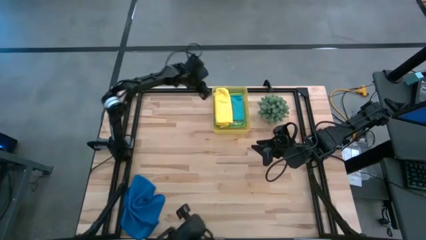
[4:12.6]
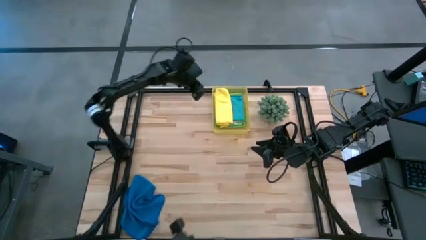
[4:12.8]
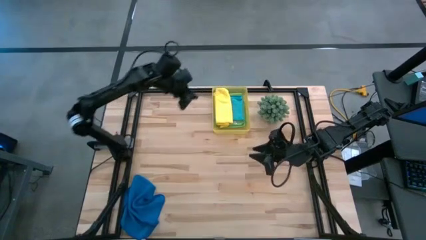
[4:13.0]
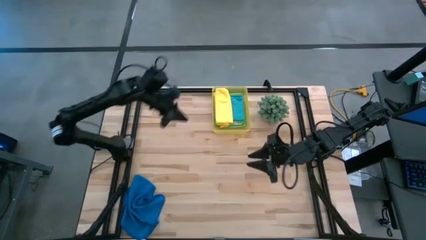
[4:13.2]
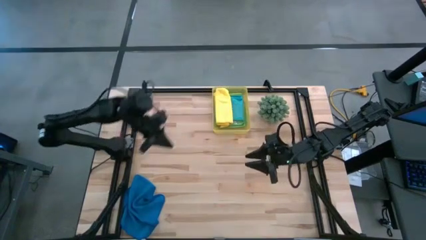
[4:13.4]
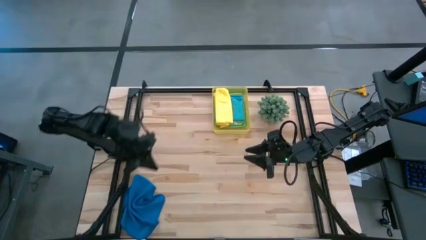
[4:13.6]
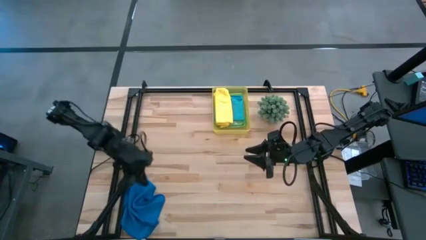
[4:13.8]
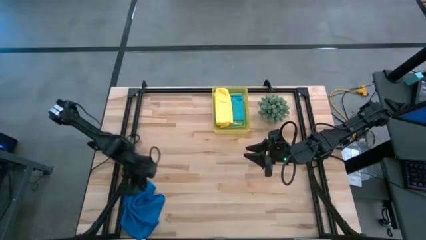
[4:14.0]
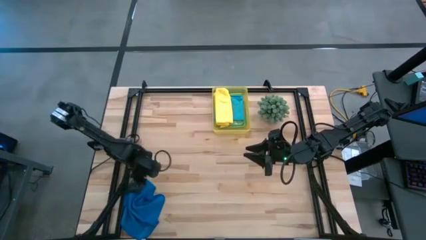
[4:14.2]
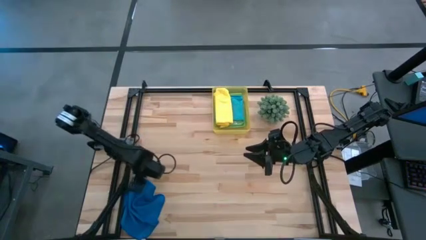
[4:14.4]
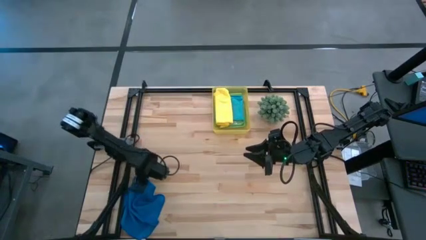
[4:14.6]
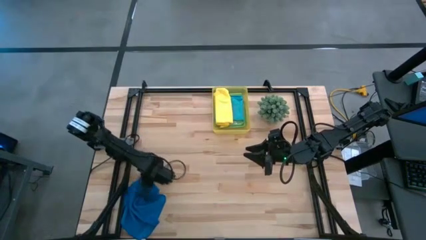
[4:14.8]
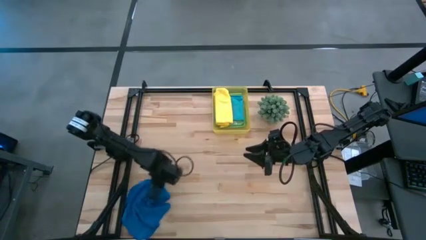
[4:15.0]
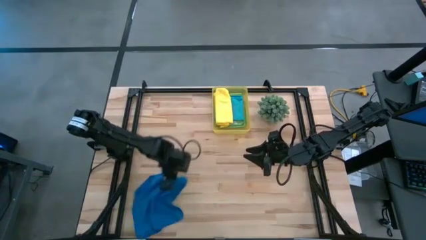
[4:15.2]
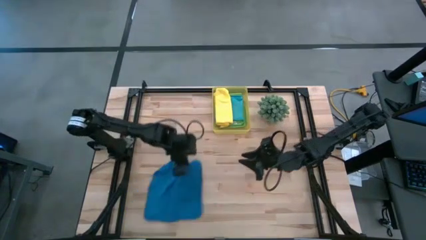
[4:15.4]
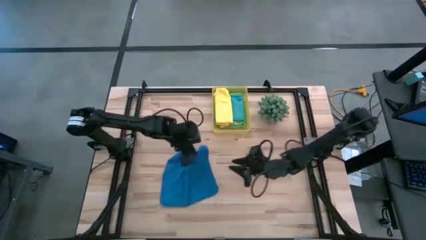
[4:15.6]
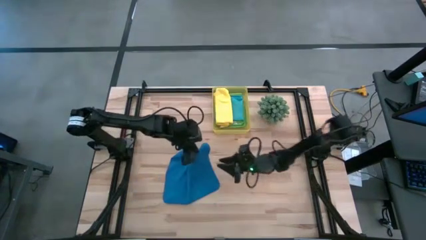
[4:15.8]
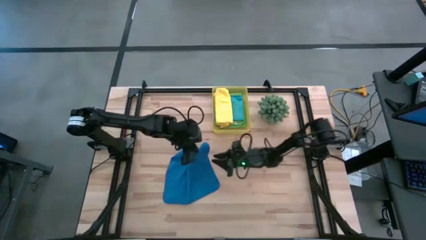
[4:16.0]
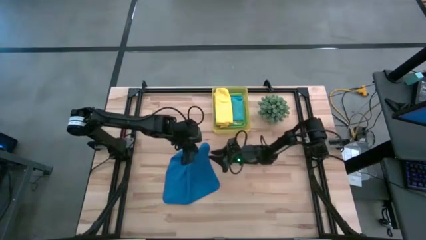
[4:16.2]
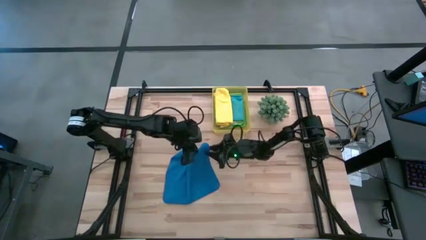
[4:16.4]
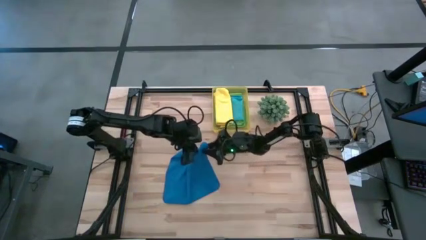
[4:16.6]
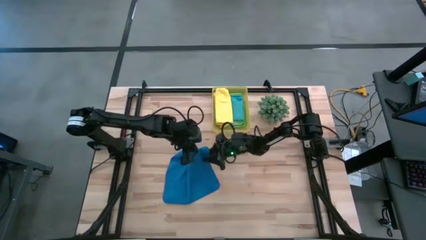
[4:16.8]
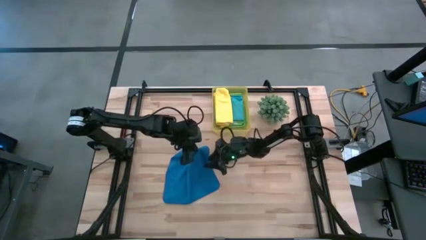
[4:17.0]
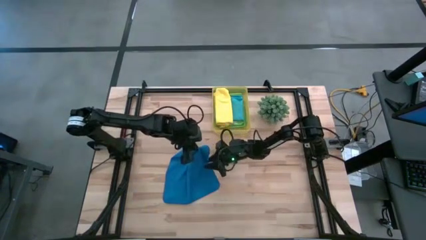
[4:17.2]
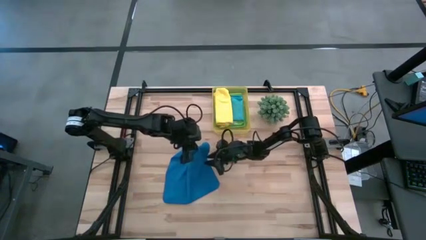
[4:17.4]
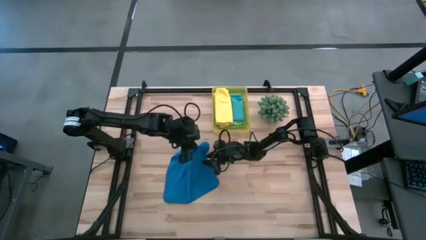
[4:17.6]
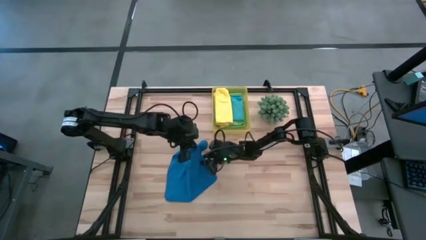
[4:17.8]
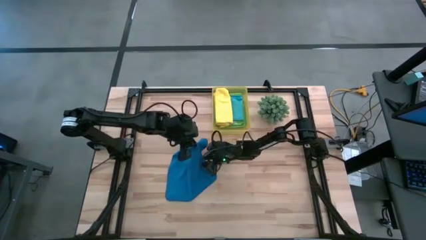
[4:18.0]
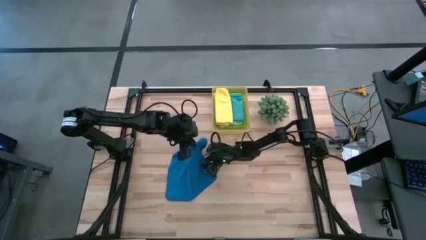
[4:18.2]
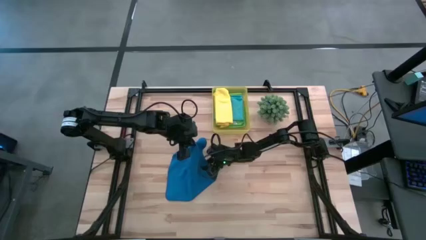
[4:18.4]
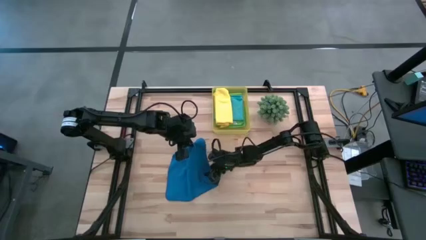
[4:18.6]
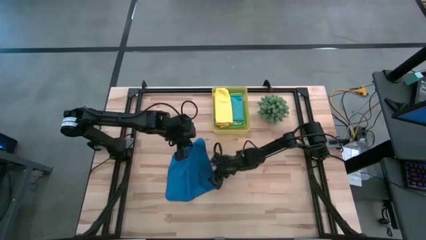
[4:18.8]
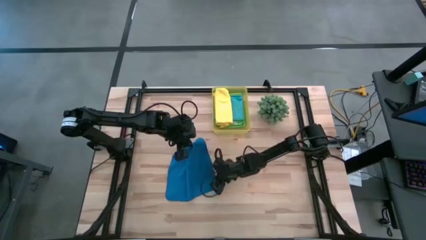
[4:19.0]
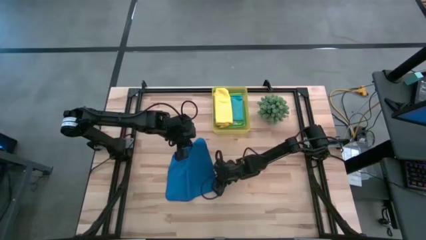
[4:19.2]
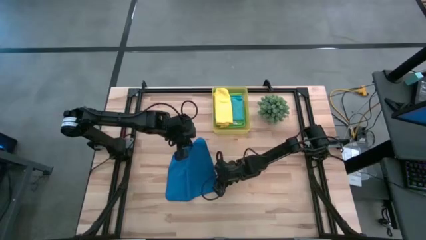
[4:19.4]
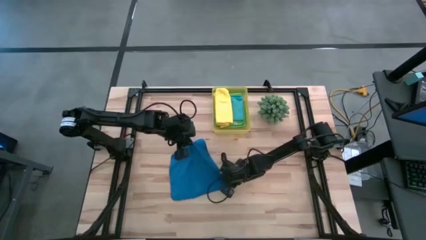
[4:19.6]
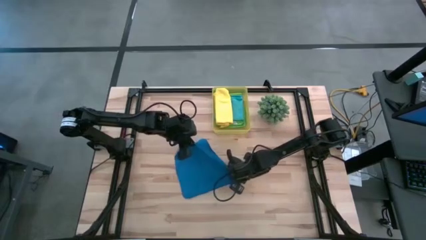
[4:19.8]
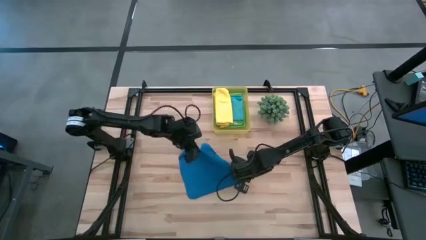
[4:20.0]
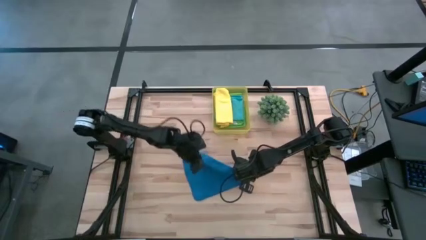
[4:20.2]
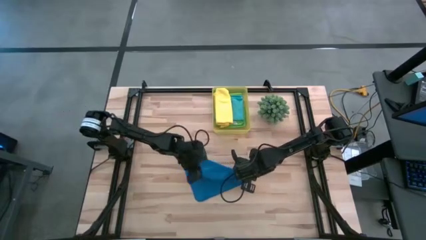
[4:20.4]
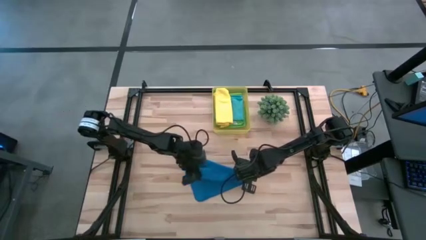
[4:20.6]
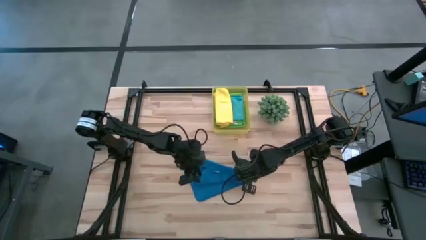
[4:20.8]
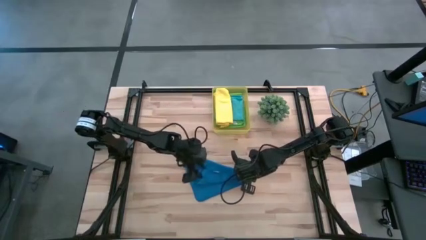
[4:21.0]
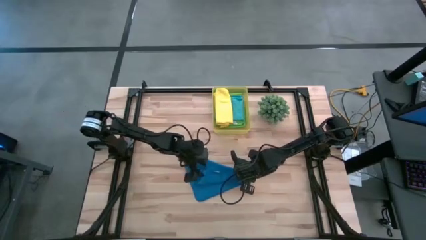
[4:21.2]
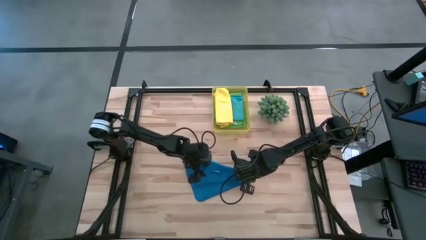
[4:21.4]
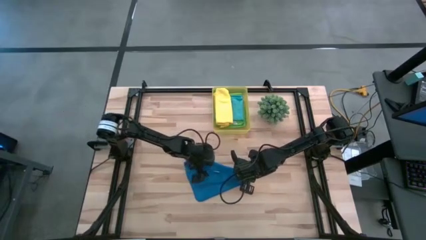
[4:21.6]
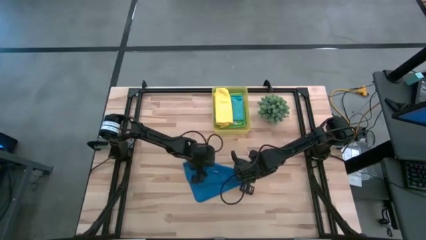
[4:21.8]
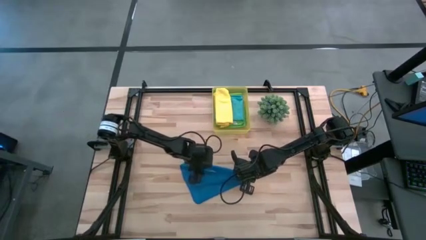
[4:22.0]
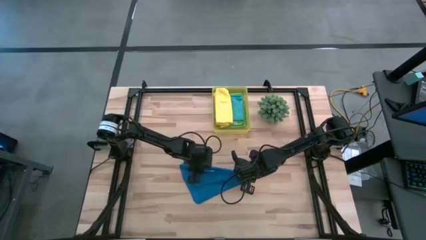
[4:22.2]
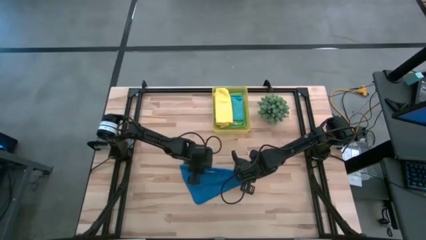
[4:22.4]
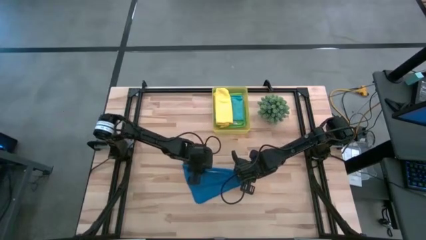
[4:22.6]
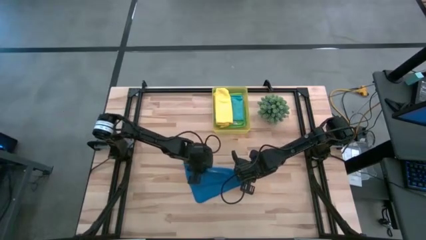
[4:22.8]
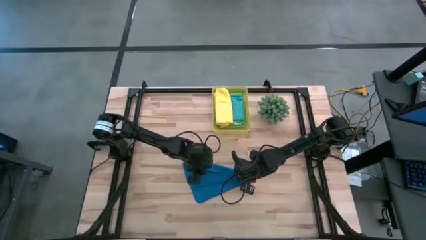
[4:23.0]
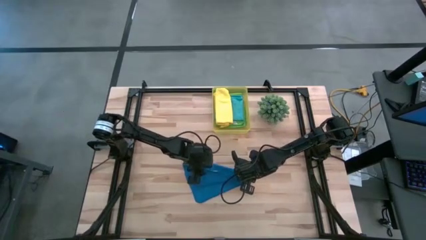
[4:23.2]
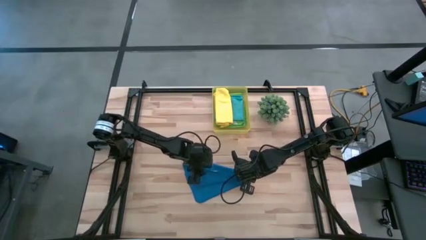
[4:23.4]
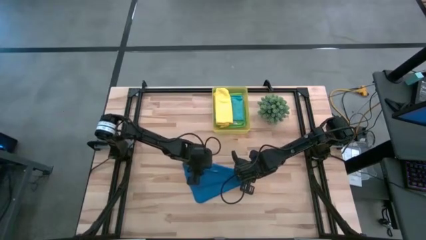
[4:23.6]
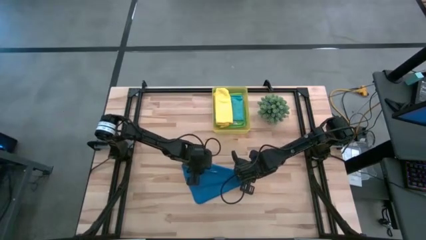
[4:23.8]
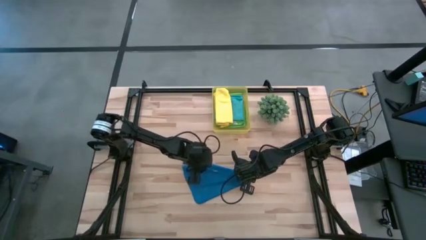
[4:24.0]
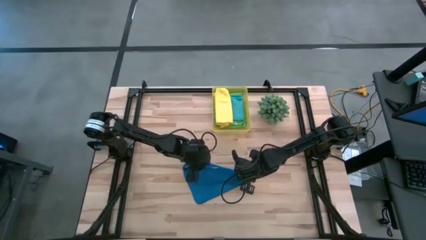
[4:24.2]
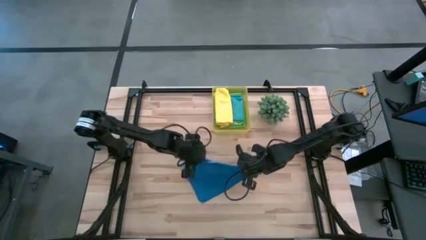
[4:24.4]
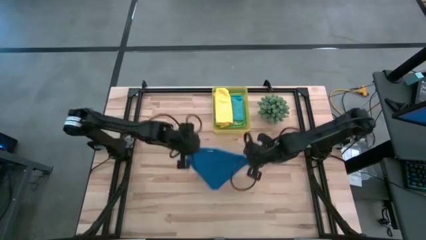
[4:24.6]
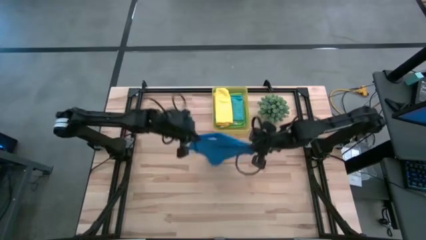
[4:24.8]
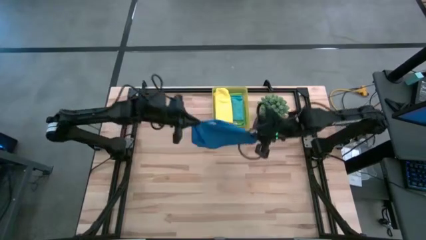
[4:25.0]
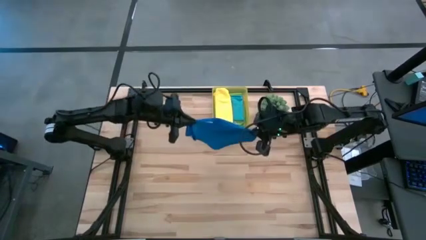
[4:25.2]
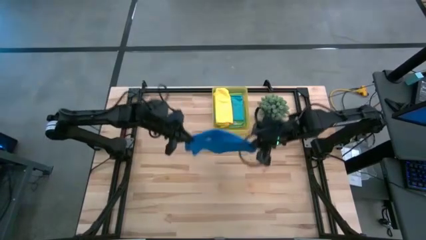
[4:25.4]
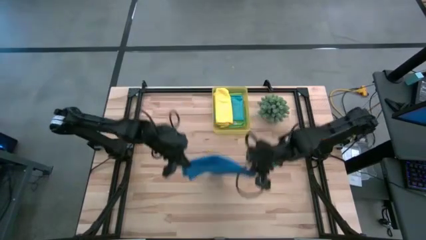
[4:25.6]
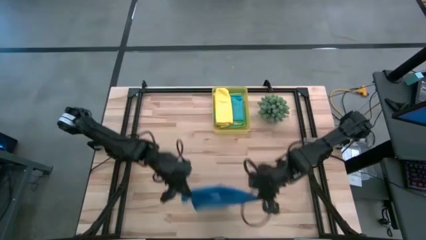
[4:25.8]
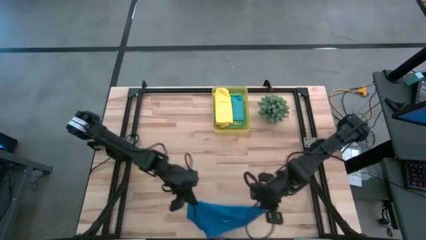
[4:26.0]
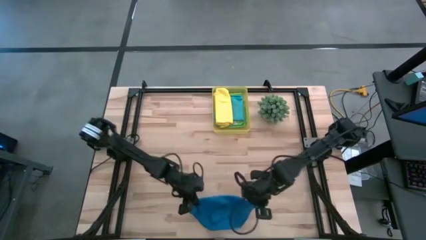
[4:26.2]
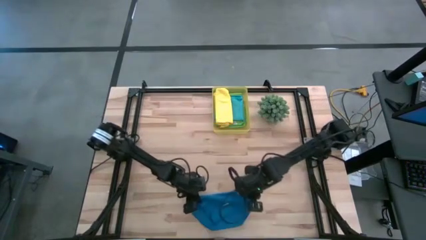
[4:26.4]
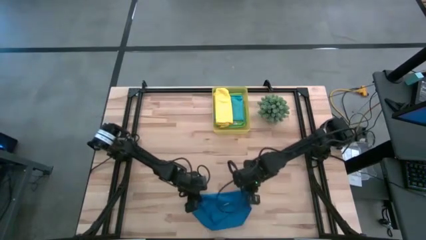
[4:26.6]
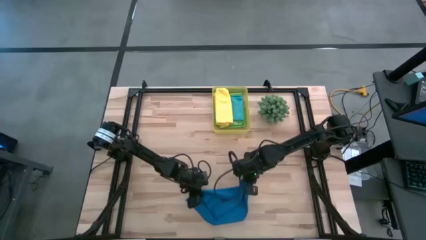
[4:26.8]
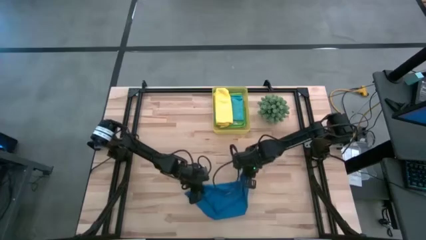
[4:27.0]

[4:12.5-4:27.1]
Task: Fold microfiber towels
Fold the blue microfiber cloth
